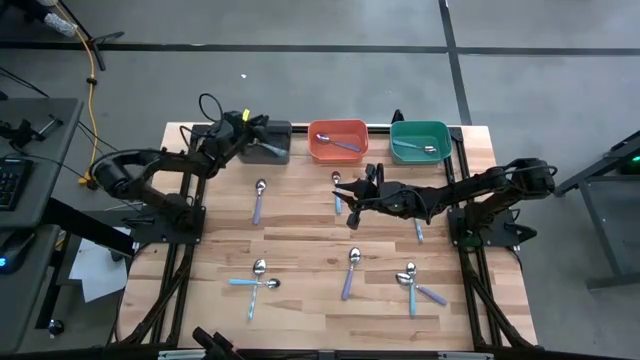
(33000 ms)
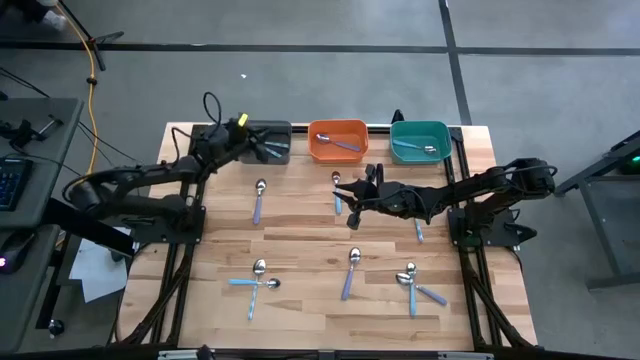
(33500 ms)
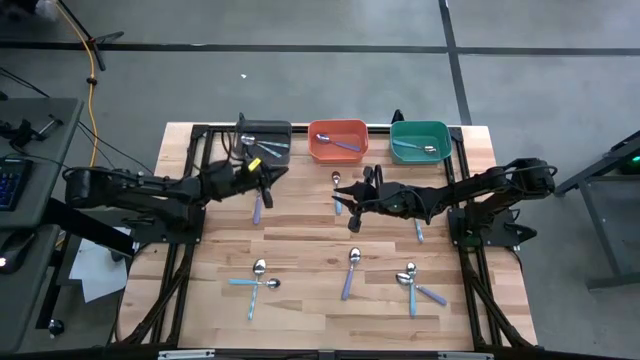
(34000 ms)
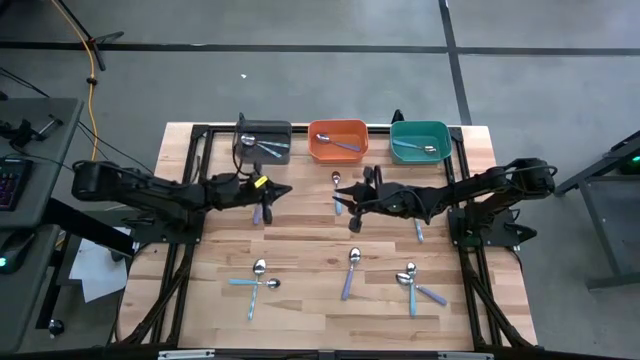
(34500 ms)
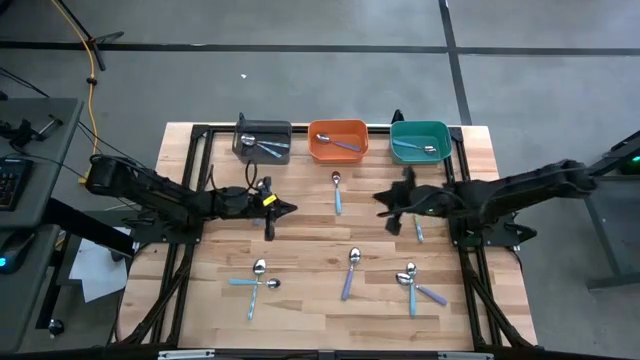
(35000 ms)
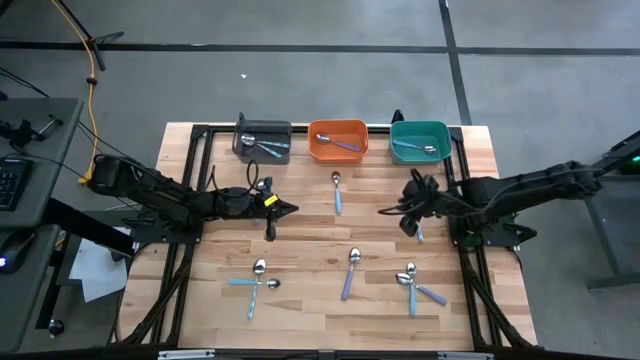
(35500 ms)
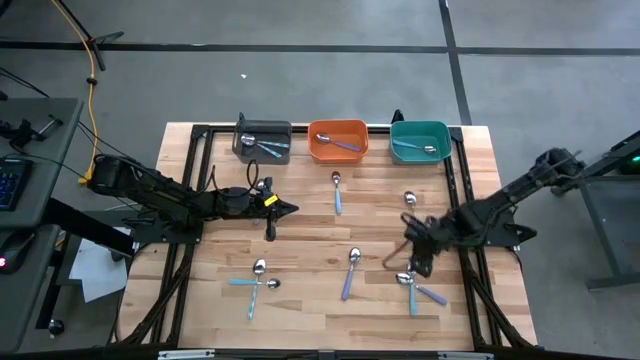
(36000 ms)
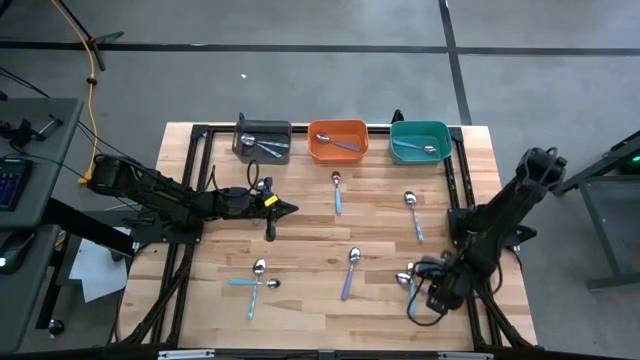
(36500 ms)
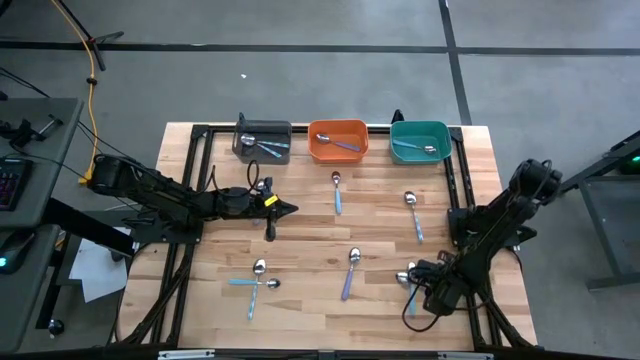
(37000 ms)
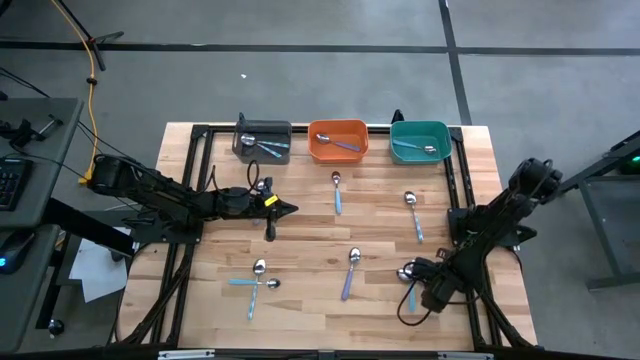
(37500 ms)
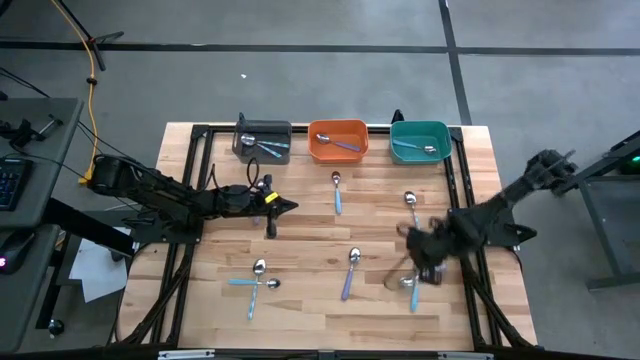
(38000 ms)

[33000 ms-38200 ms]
Task: Sort silverware by color (type)
Put the purple spoon into the orange bin

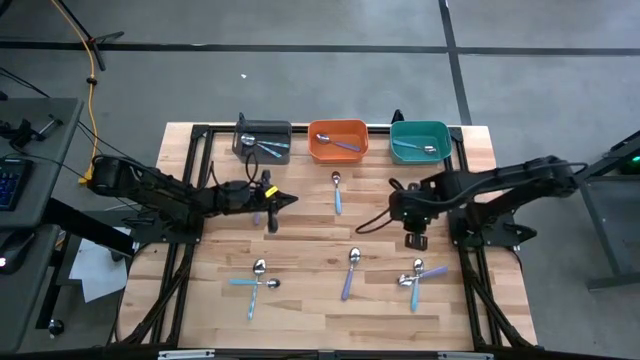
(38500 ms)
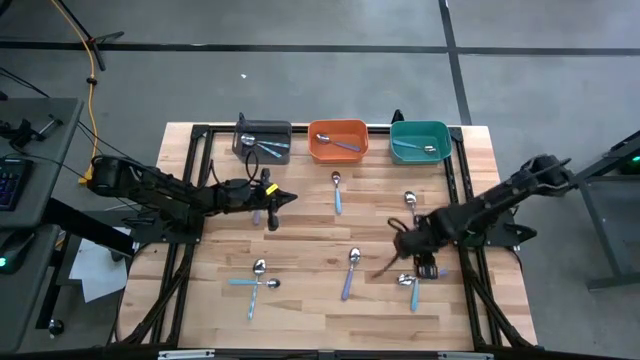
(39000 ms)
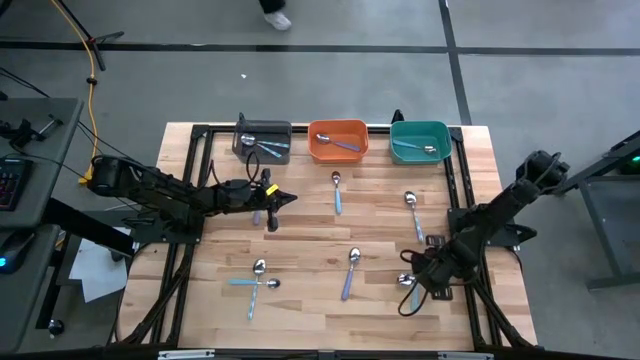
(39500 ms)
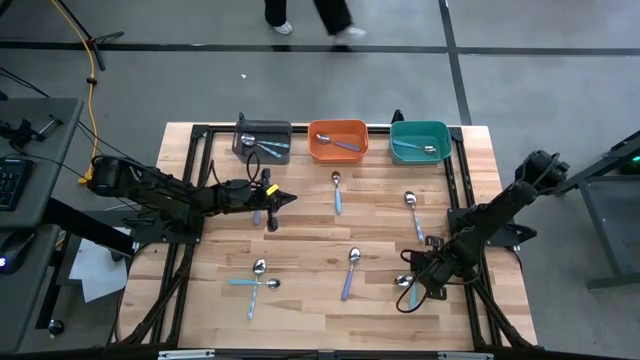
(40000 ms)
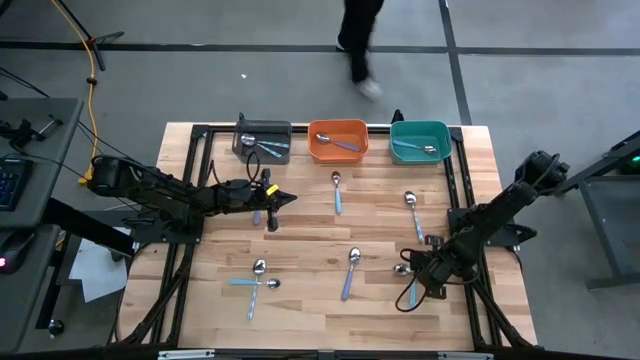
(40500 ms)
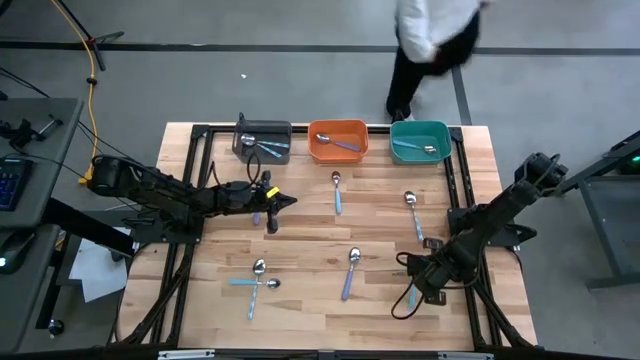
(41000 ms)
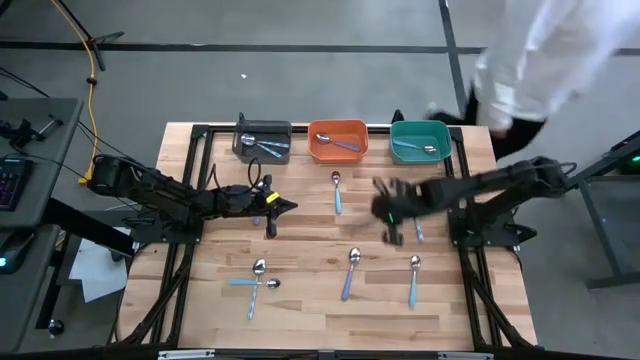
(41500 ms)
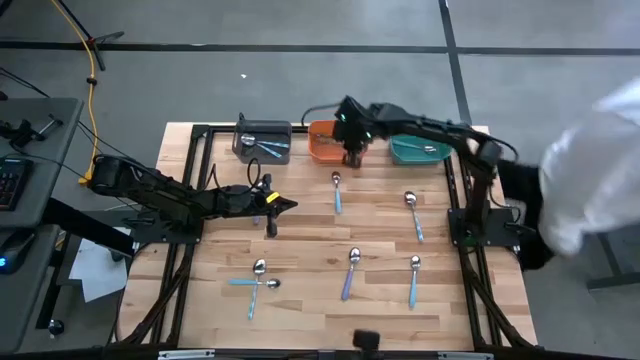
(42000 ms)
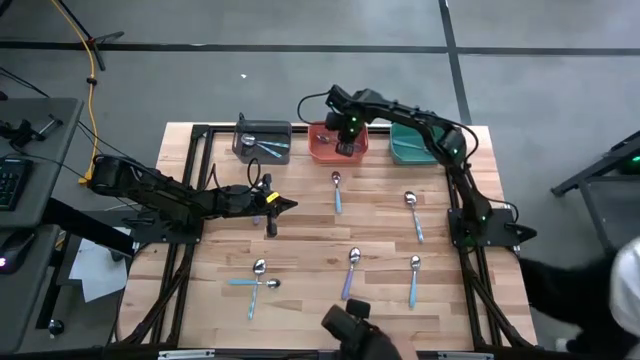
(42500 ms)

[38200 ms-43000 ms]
Put the purple spoon into the orange bin

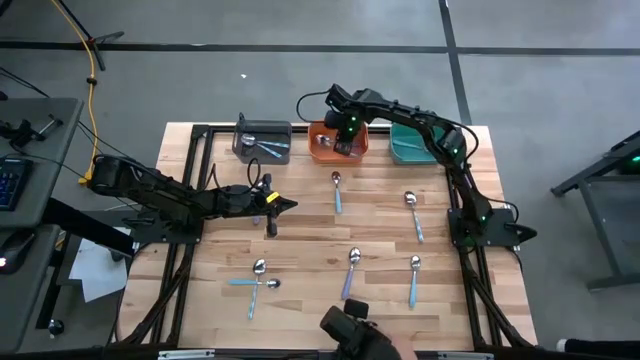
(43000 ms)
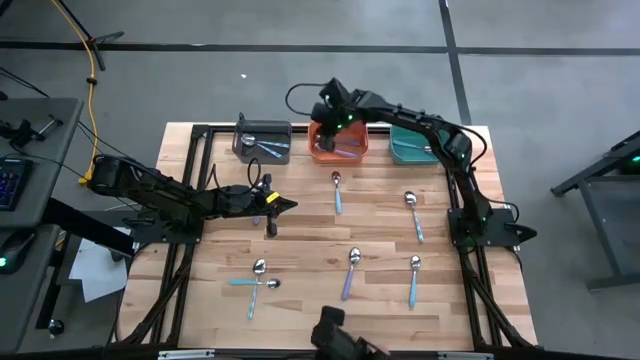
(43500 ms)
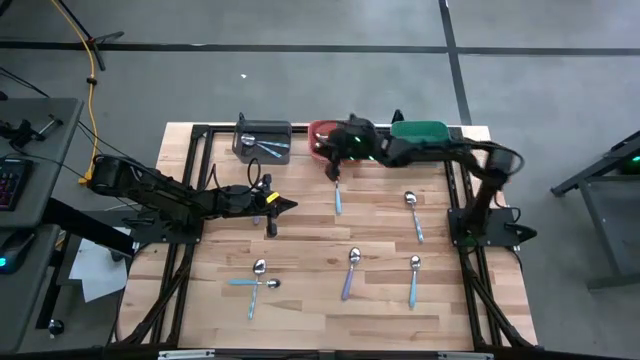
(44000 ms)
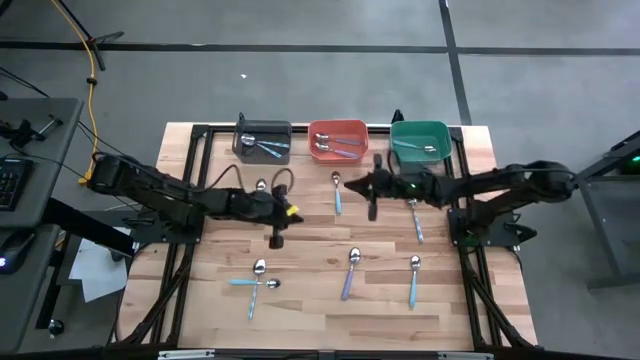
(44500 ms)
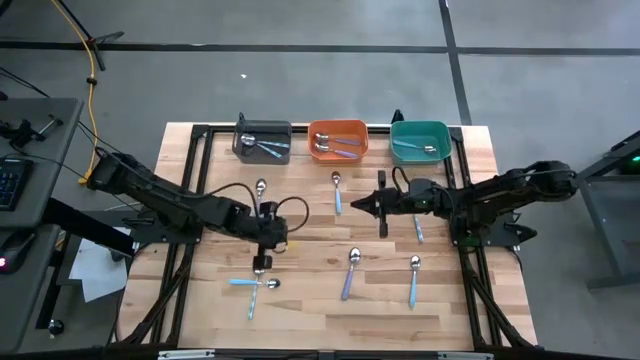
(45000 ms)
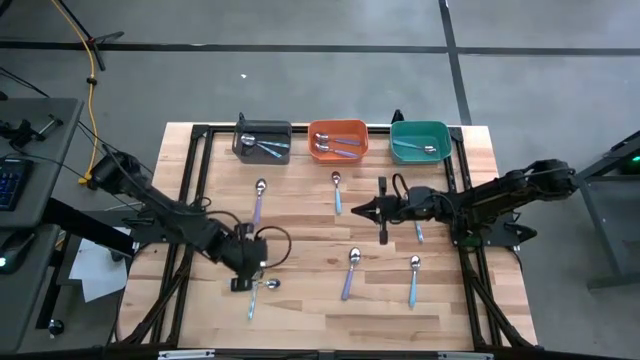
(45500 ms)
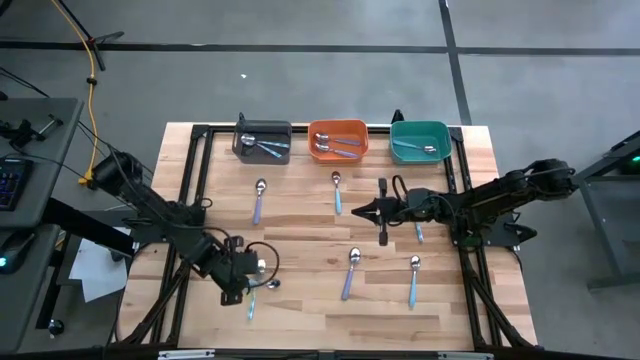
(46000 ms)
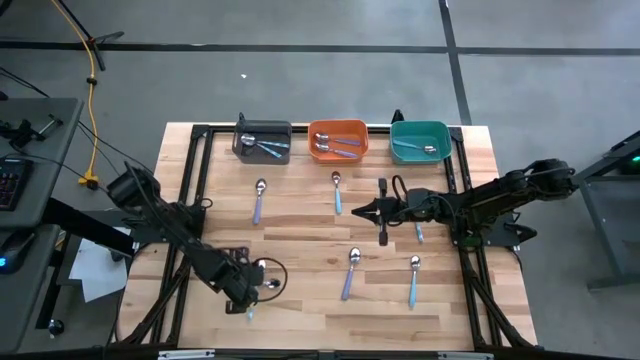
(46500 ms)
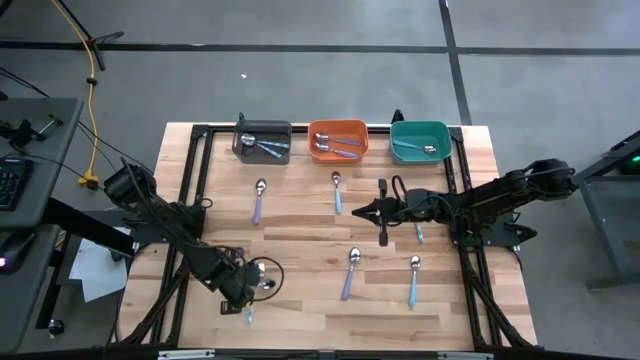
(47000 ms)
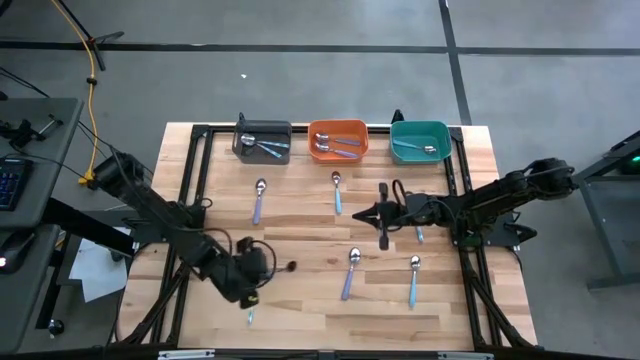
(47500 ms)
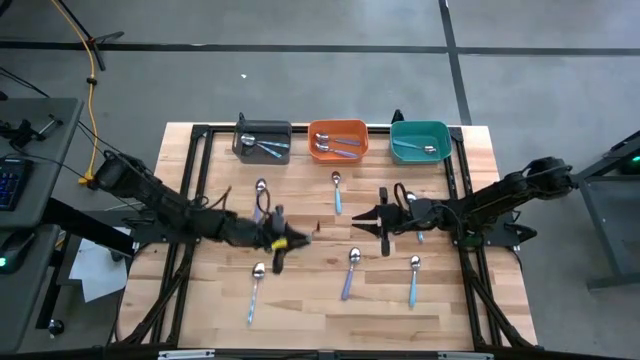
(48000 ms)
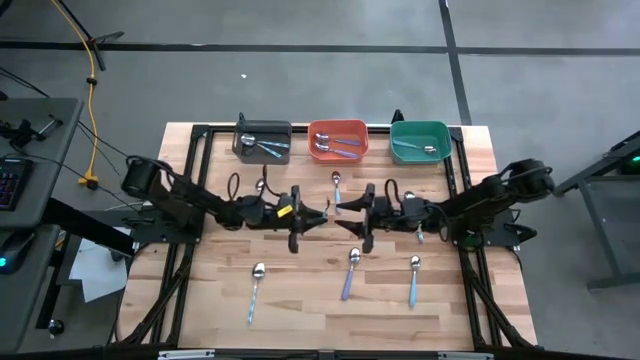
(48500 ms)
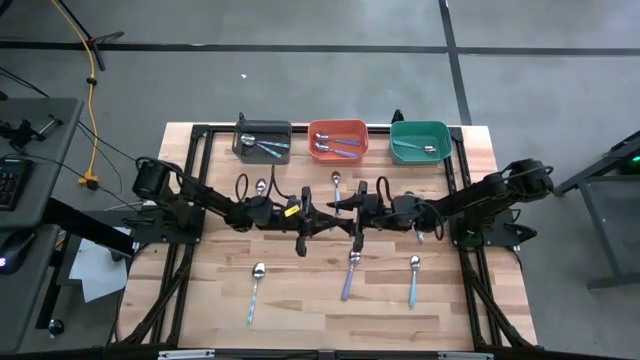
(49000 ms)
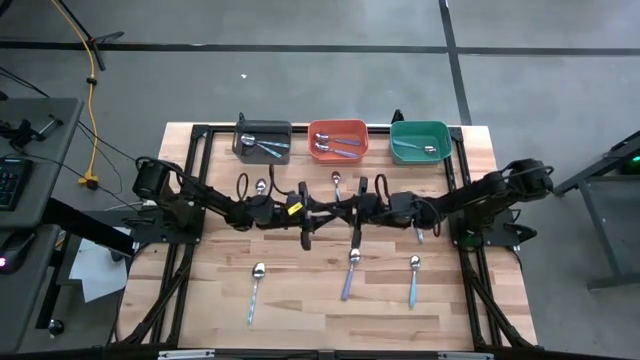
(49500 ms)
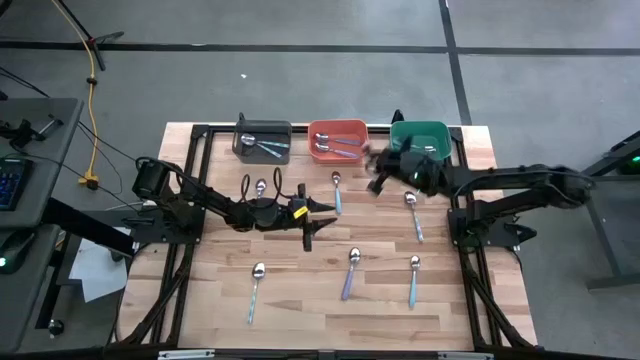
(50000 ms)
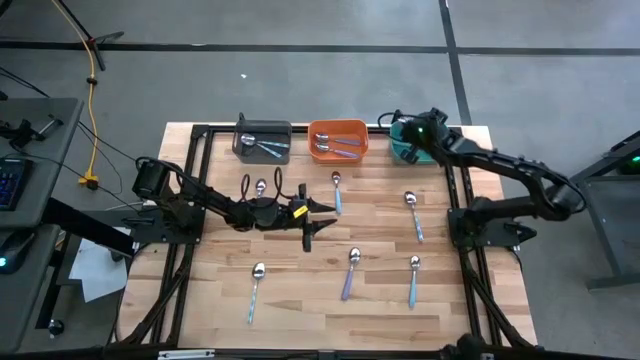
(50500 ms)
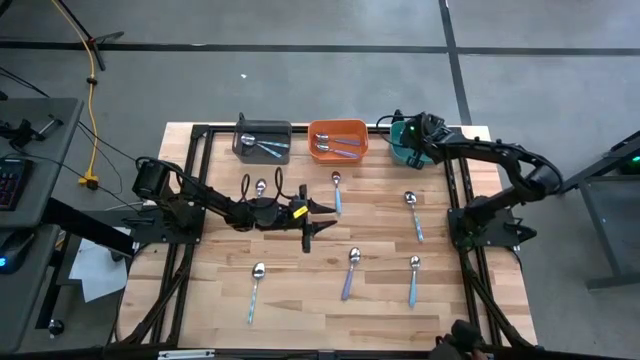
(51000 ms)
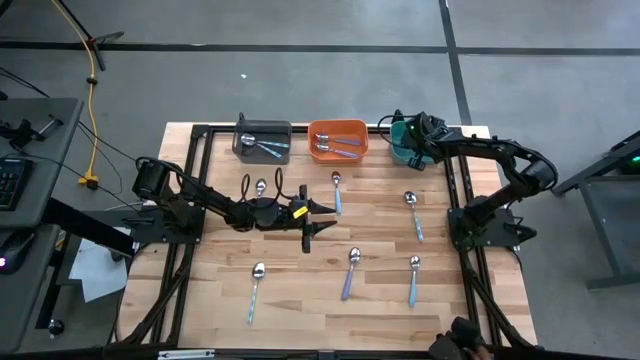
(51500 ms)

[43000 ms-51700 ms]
Put the blue spoon into the green bin

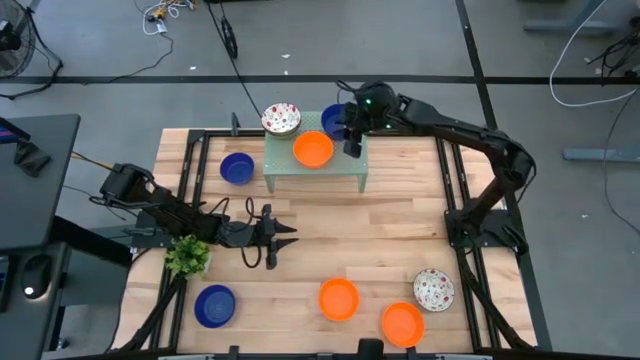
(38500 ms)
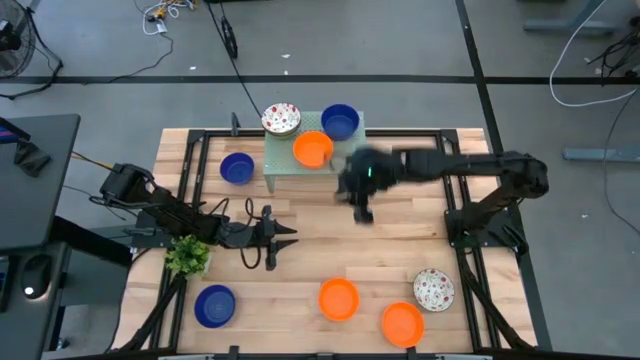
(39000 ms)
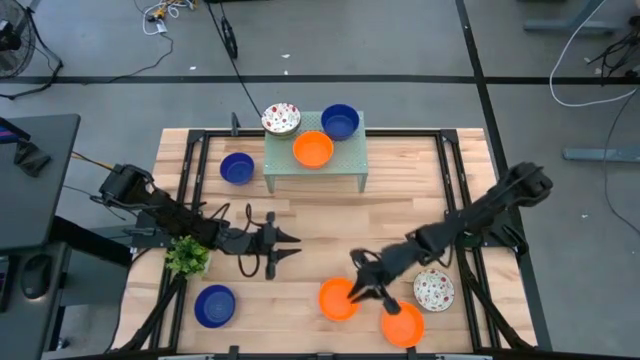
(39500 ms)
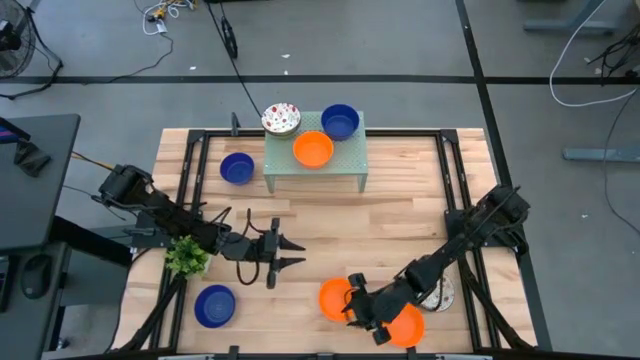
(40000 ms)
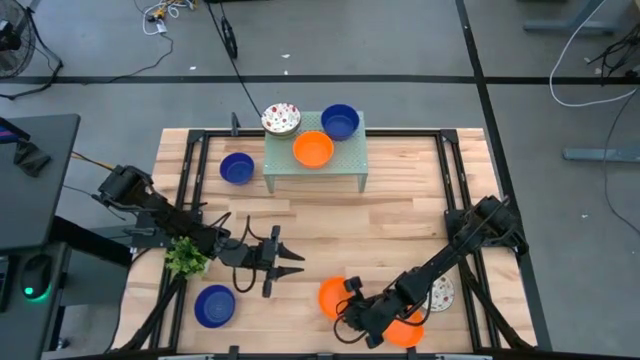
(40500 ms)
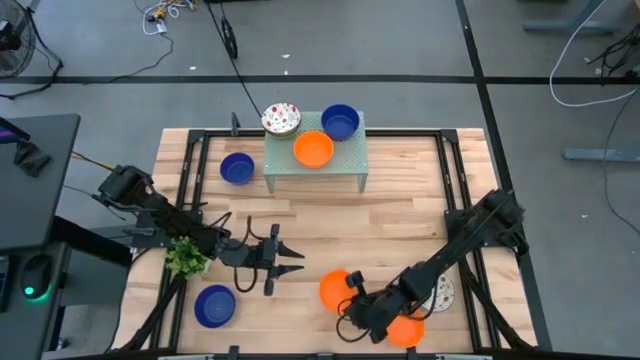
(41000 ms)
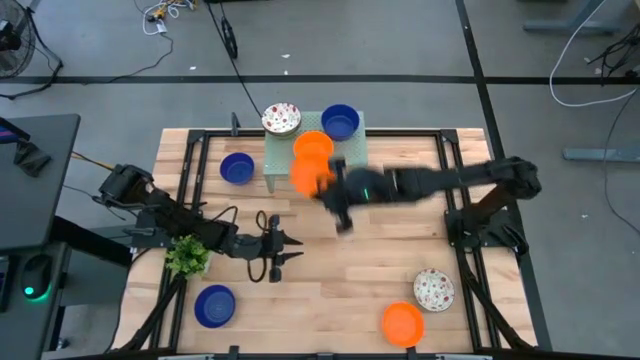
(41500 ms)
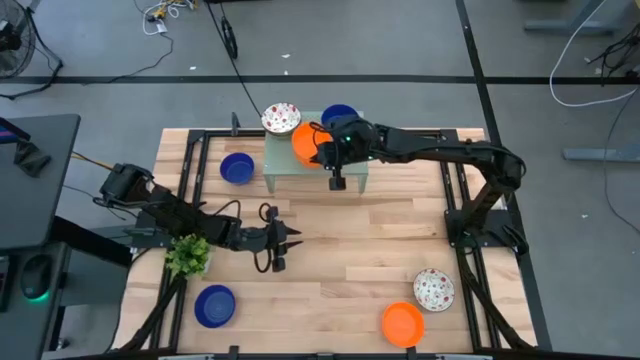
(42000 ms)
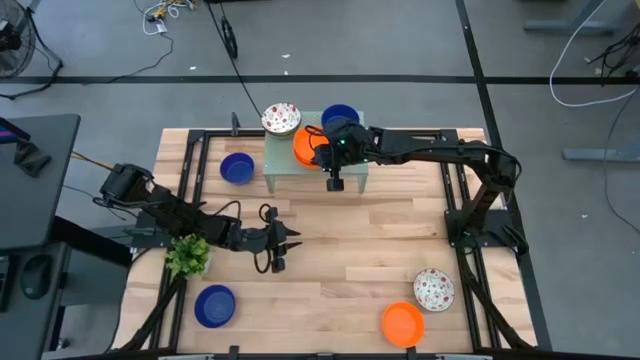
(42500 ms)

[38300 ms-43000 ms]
Task: Pick & Place Mini bowls
Stack the orange bowl on the orange bowl on the shelf
